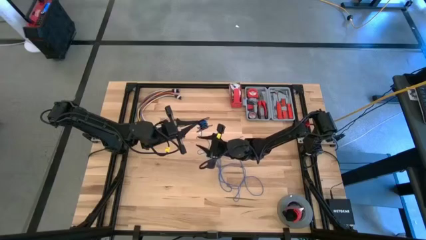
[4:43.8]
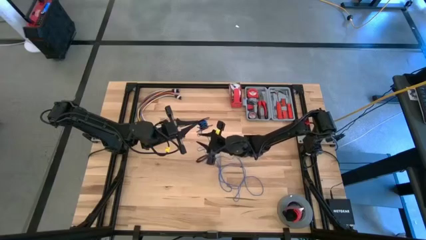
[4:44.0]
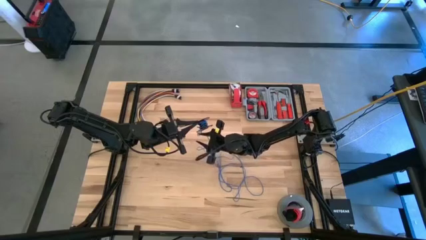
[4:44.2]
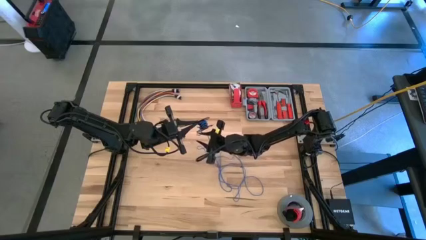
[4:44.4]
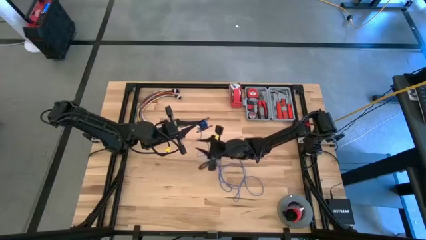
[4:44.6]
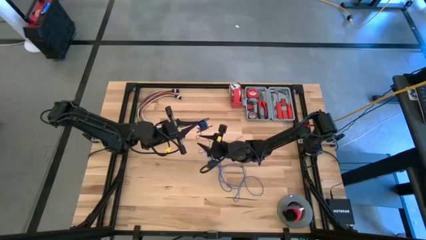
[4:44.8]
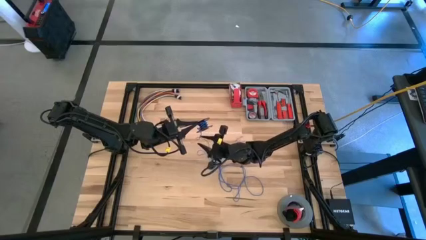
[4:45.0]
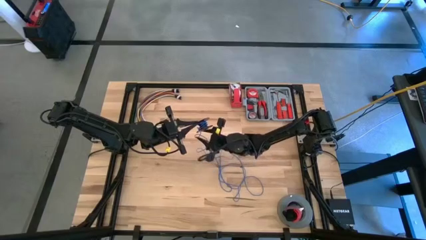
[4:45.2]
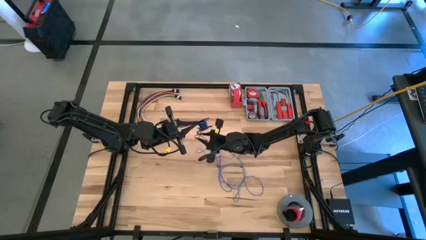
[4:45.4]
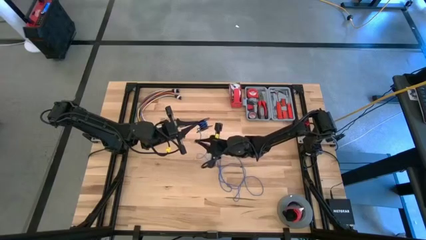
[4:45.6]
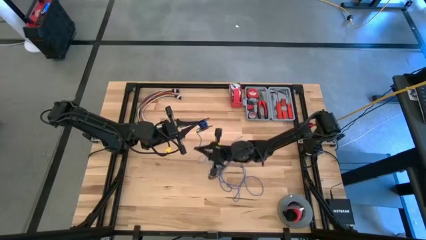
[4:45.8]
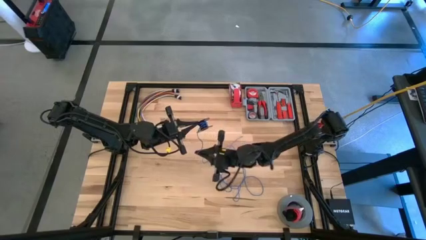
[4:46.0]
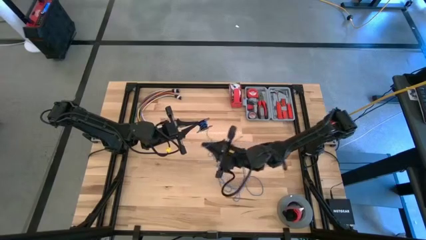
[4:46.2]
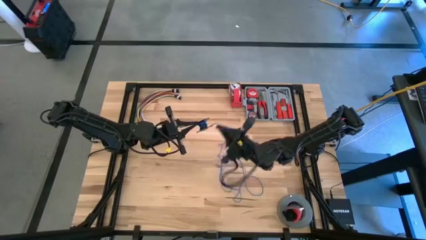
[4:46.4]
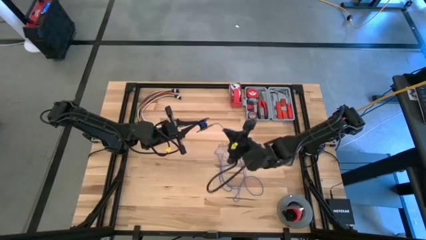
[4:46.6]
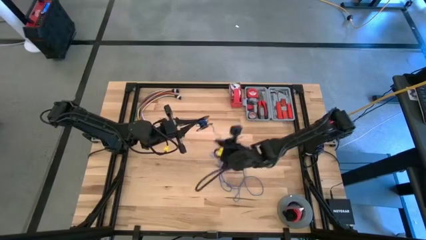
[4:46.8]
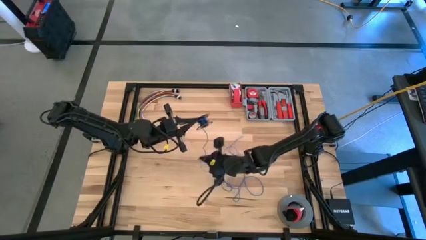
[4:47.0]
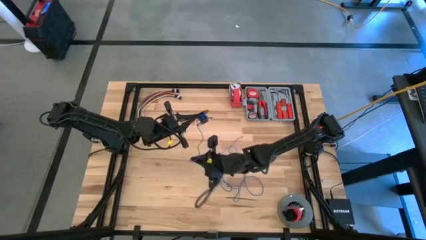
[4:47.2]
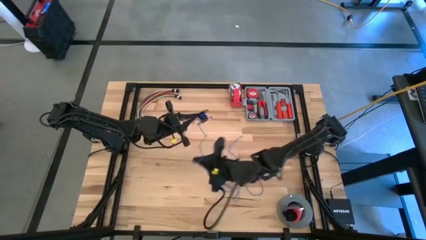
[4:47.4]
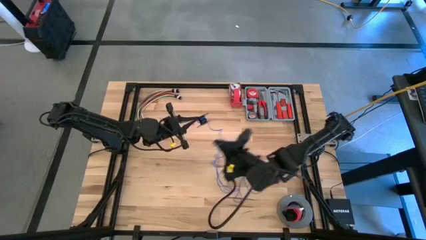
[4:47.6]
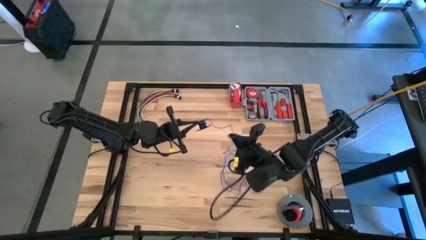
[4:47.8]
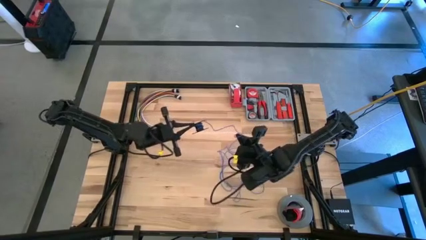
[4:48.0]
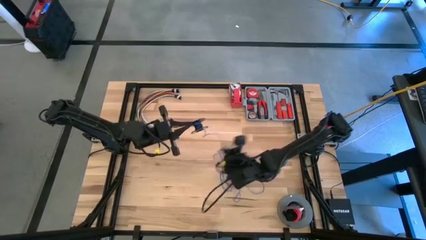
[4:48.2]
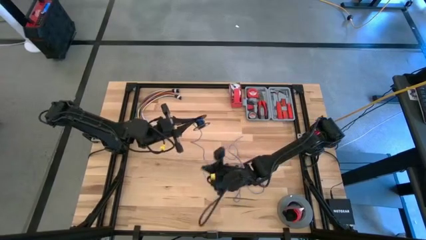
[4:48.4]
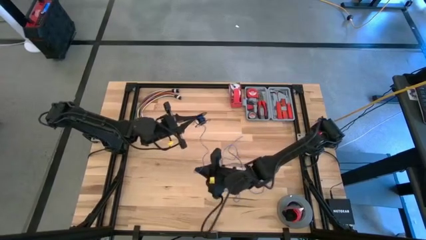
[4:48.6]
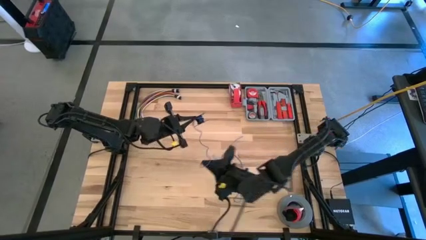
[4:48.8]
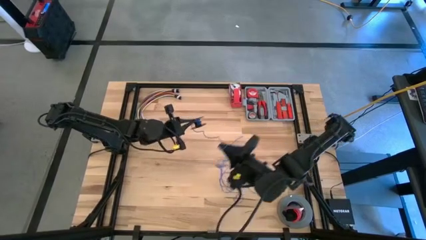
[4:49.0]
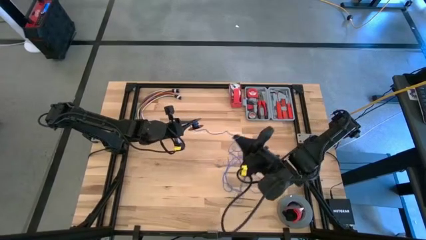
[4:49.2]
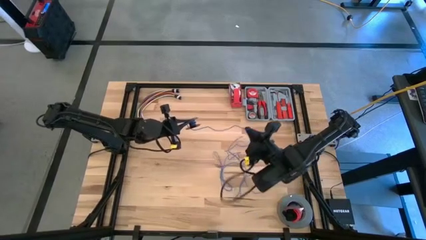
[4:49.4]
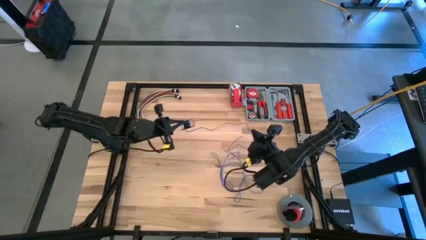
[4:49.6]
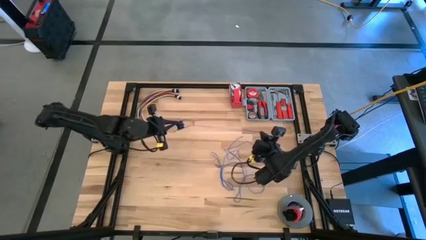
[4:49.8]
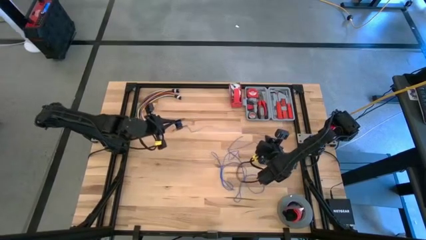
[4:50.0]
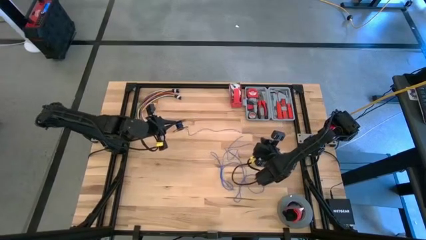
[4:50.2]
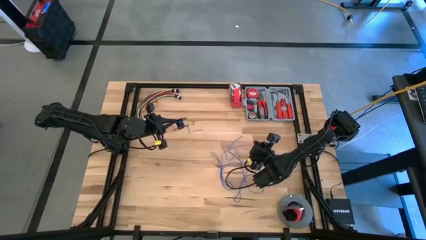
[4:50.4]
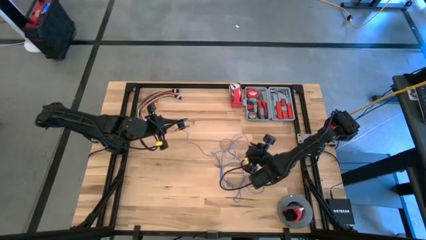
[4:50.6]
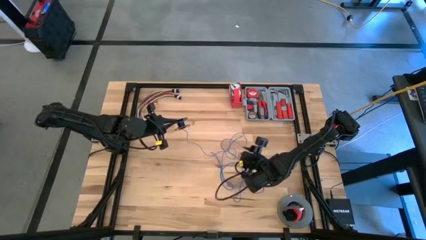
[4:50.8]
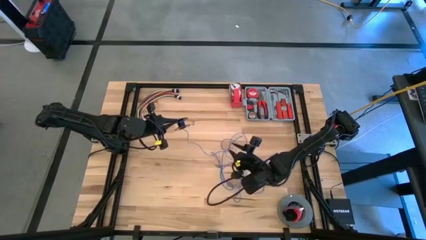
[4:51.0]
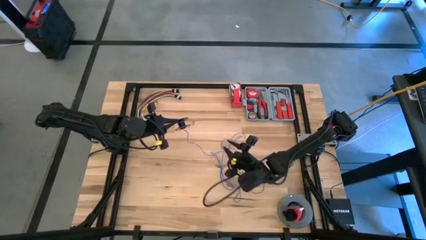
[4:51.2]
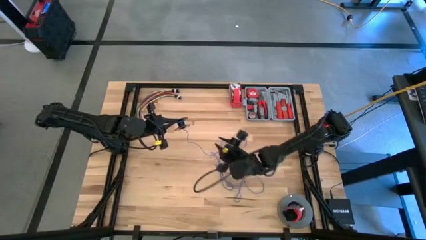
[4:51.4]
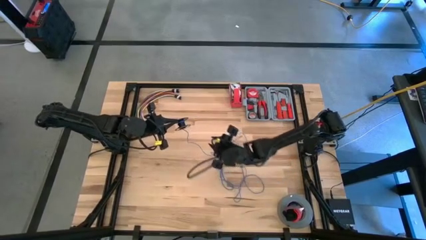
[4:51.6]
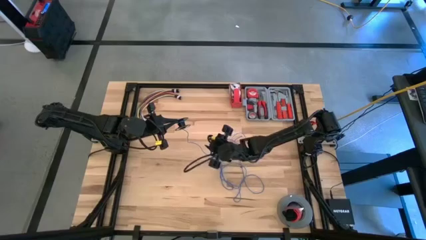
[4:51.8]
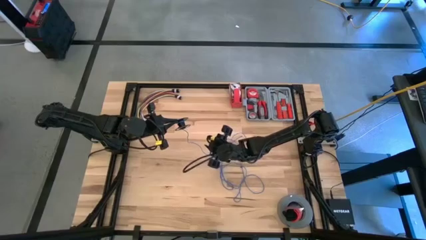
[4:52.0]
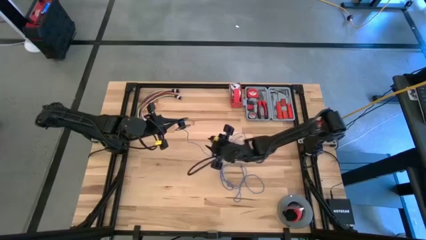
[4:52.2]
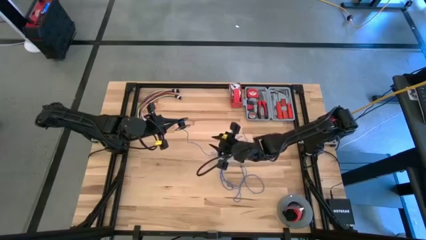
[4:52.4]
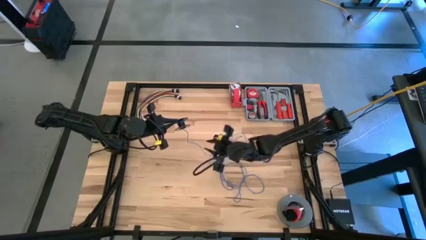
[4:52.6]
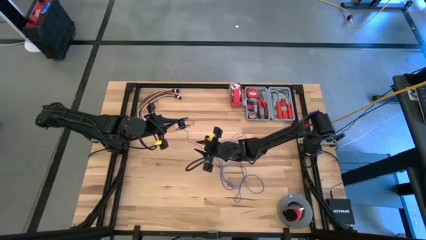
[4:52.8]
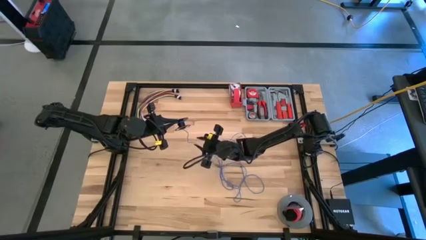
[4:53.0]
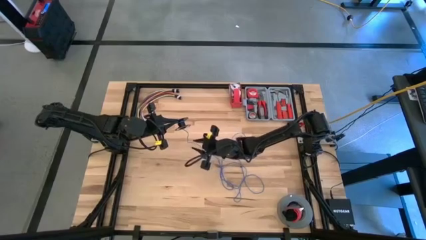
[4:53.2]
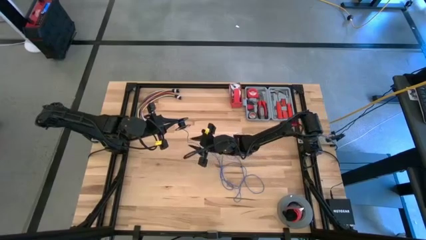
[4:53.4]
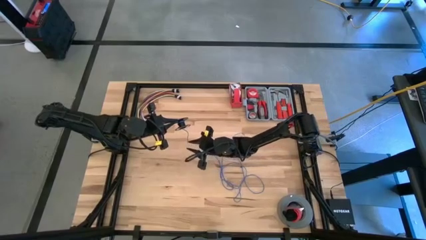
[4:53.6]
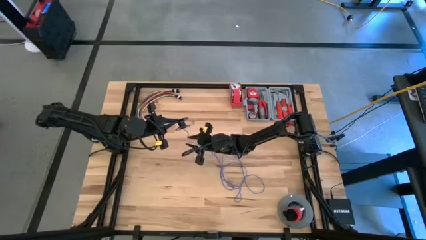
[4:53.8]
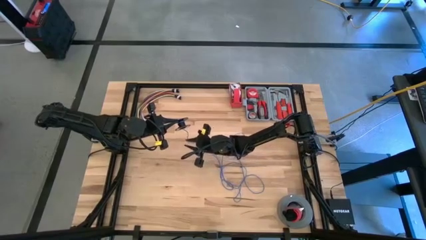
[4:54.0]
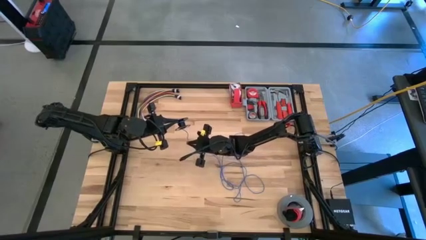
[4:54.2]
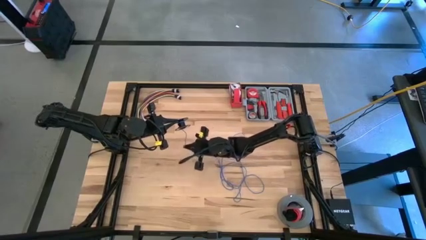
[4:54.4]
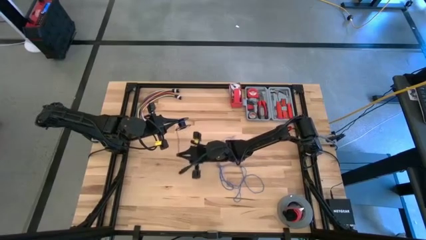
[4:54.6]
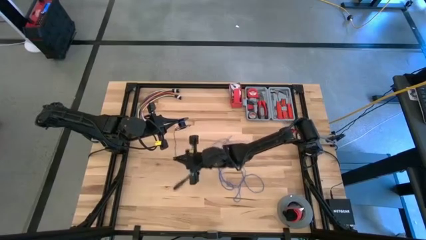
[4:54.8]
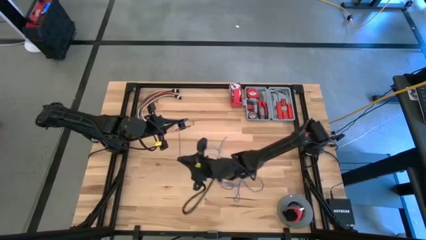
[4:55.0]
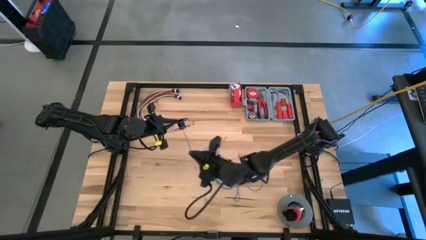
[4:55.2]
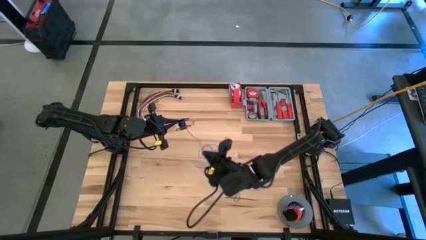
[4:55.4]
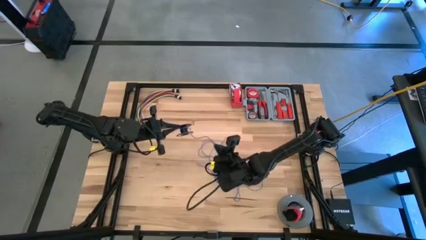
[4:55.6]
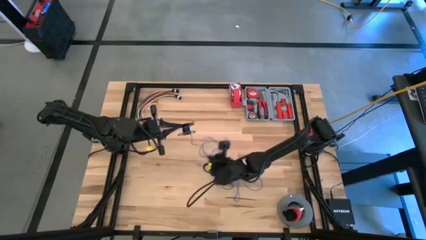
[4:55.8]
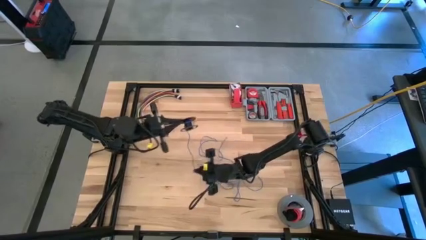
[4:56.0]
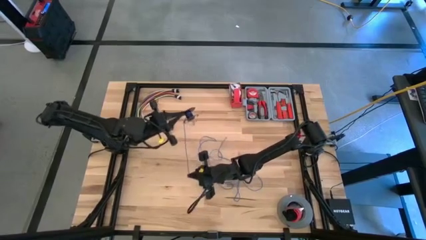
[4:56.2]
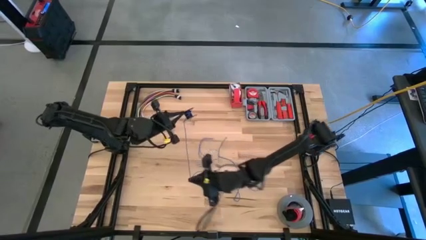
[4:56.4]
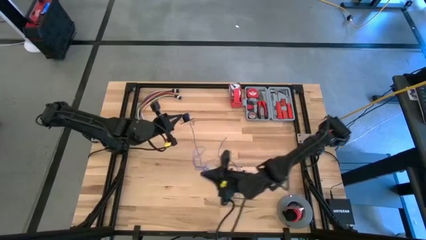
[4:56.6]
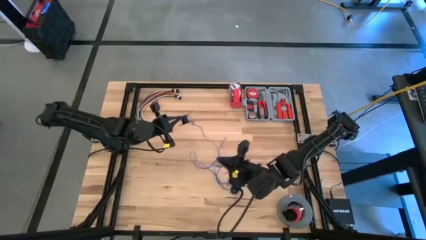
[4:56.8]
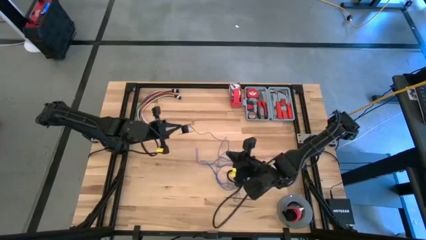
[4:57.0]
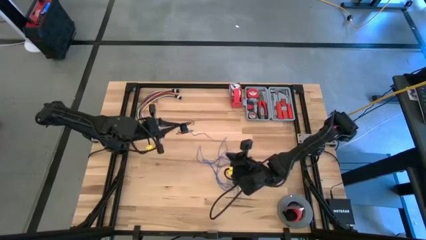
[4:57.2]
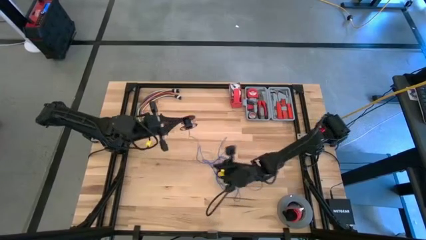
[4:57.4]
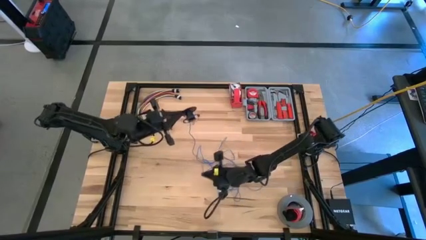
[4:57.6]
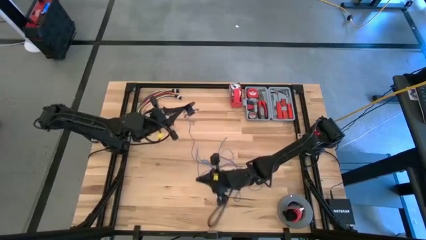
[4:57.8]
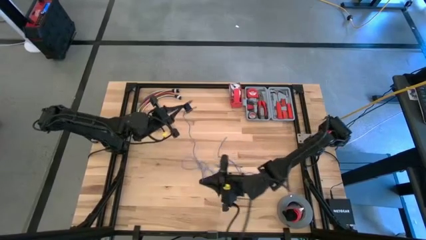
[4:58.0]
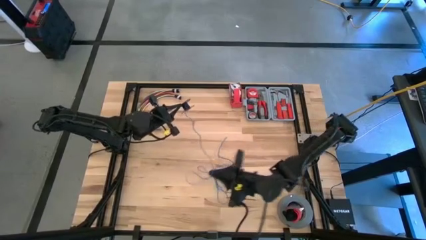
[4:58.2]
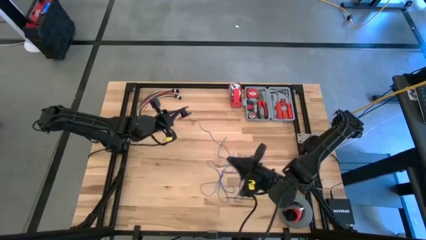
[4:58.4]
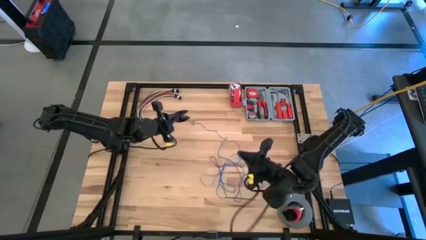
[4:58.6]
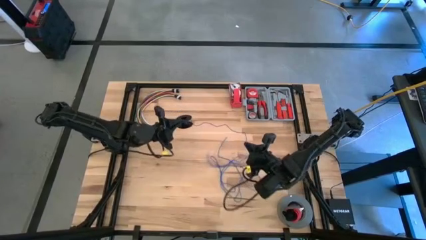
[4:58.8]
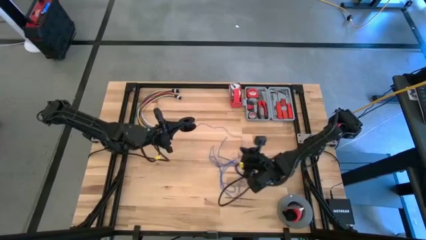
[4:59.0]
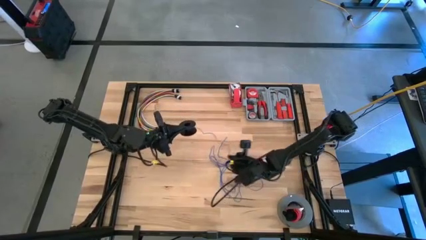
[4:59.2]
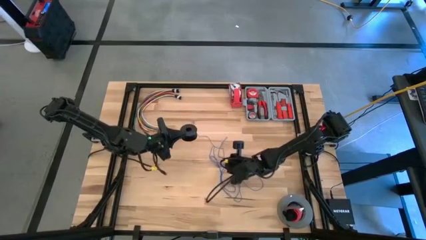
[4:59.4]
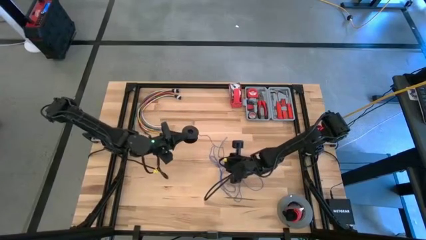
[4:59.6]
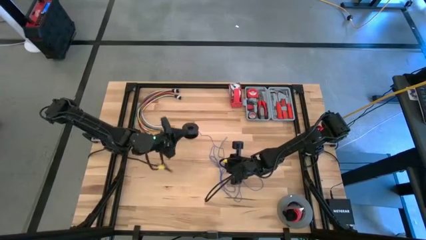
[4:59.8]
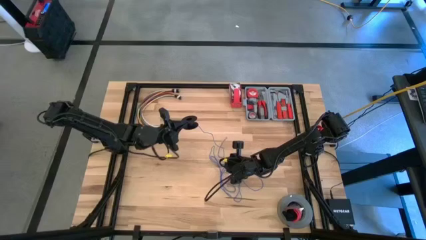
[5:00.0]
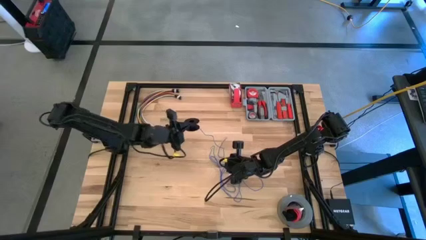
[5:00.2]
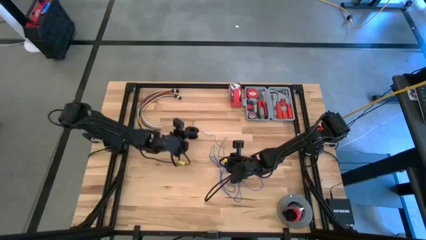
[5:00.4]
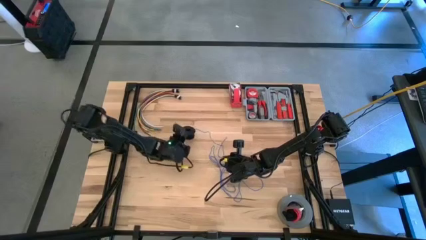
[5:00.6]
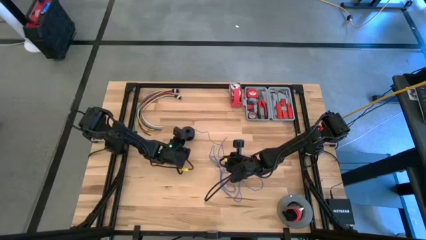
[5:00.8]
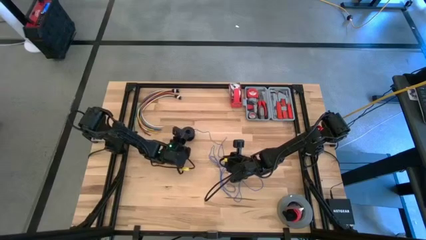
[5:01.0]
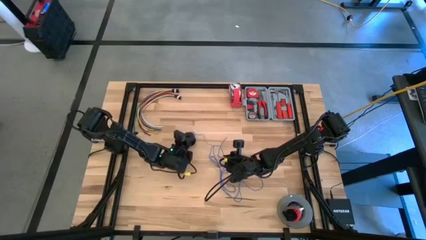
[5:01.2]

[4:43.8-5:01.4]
Task: Coil cords
Uncoil the blue wire from the black spool
